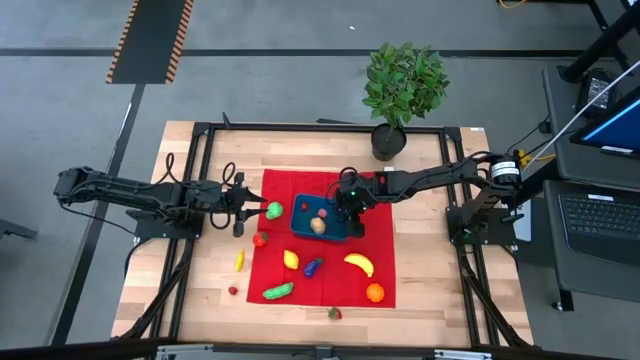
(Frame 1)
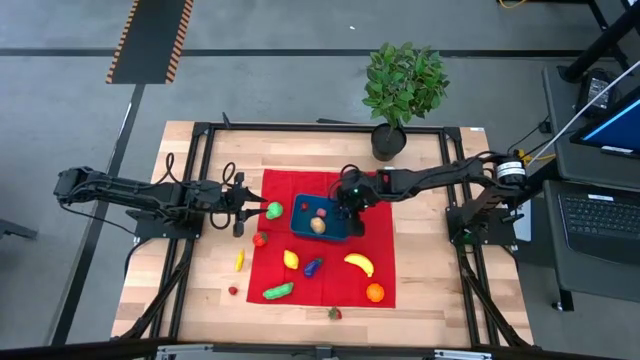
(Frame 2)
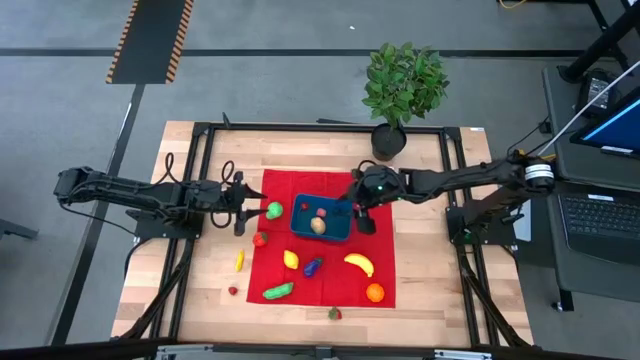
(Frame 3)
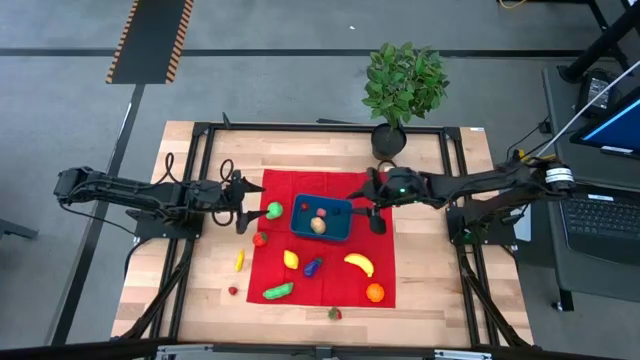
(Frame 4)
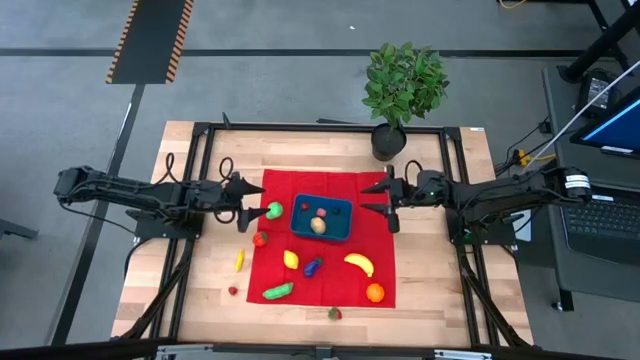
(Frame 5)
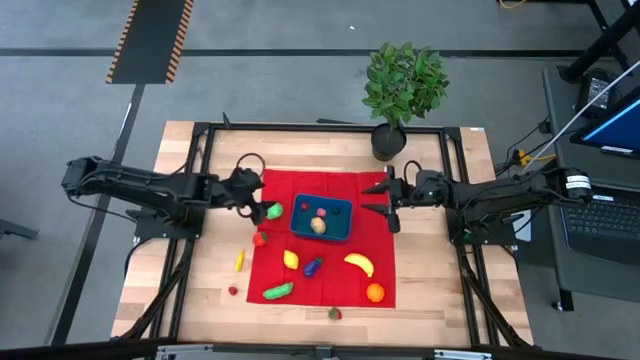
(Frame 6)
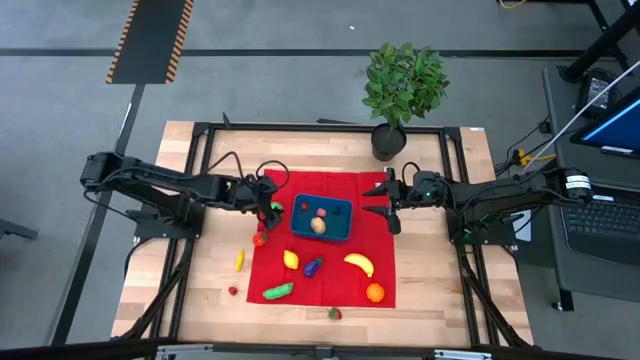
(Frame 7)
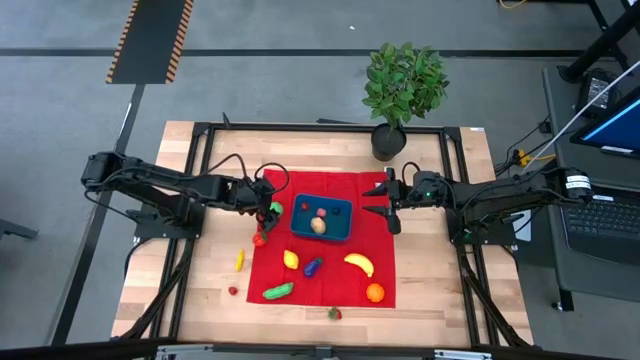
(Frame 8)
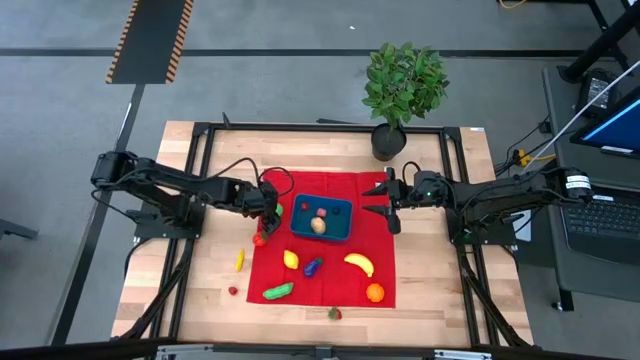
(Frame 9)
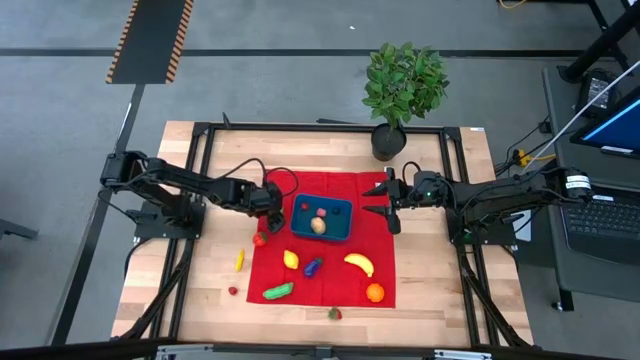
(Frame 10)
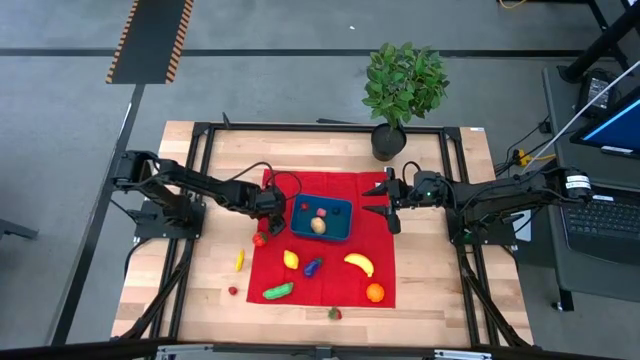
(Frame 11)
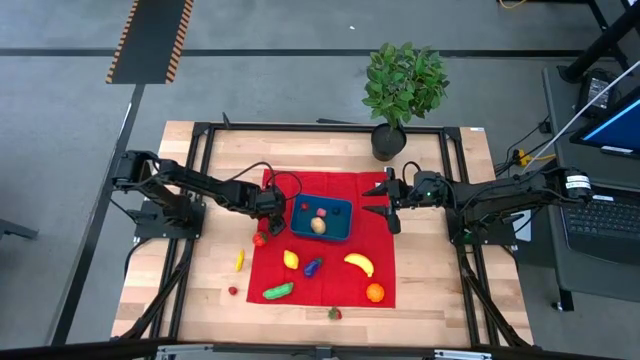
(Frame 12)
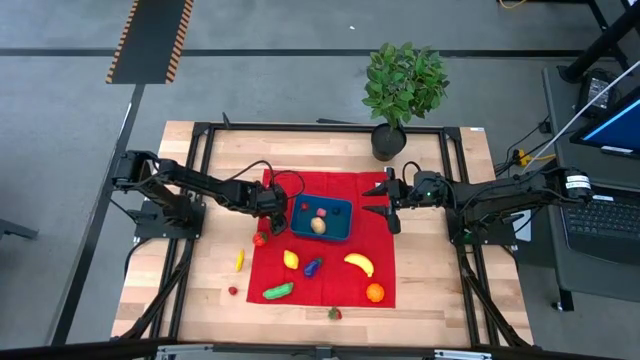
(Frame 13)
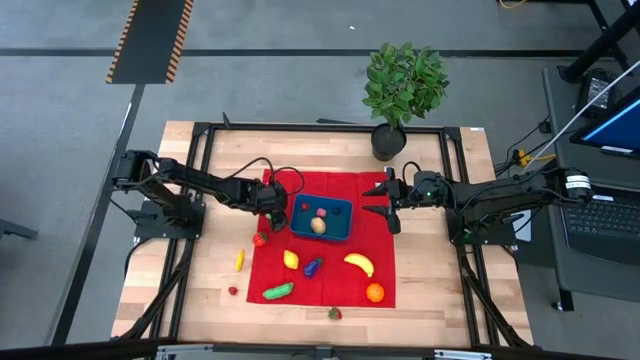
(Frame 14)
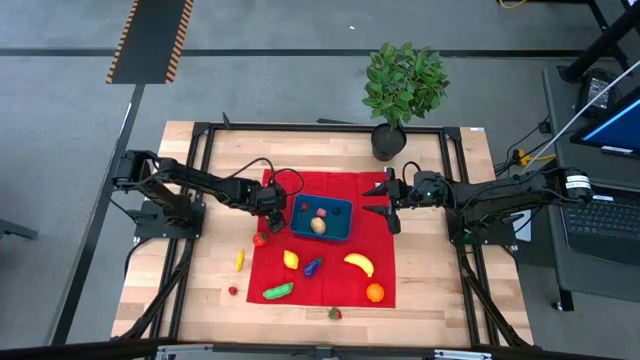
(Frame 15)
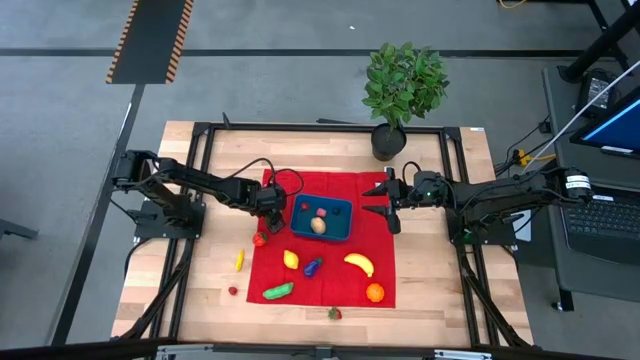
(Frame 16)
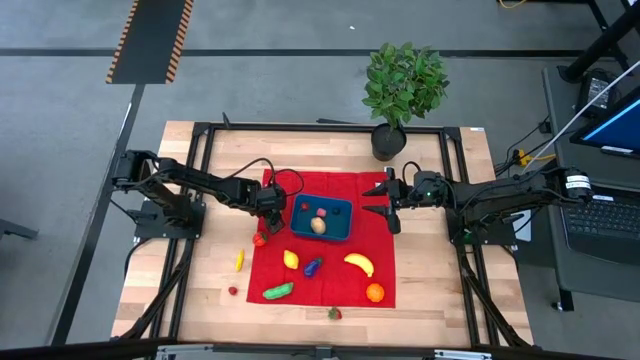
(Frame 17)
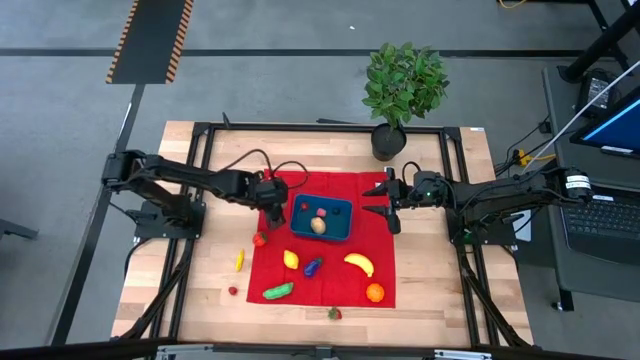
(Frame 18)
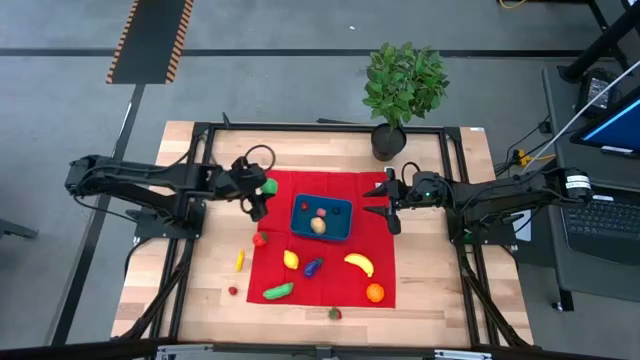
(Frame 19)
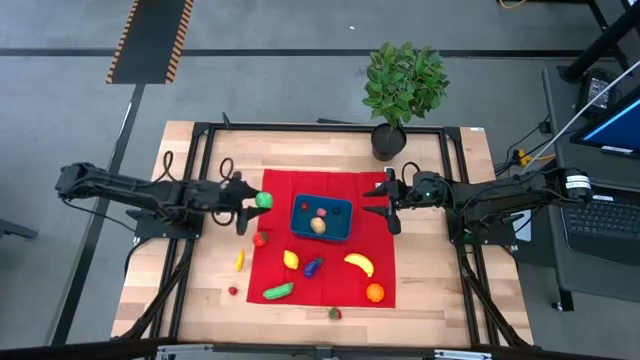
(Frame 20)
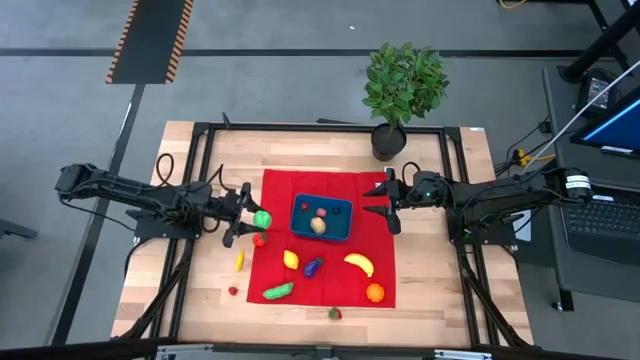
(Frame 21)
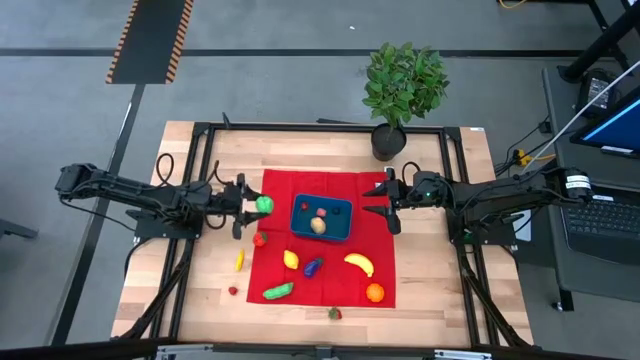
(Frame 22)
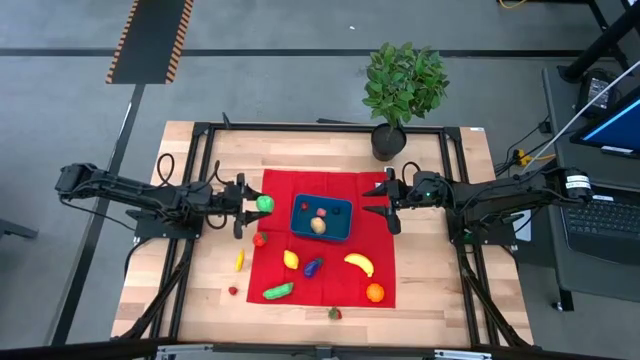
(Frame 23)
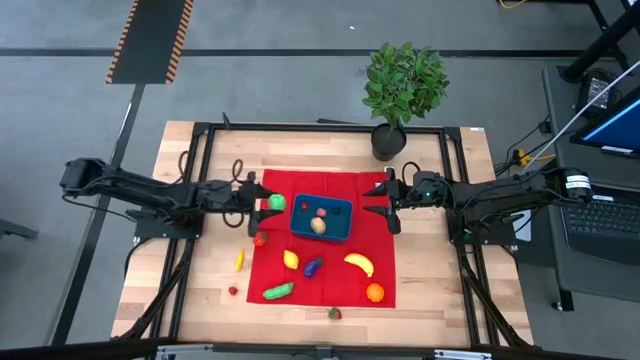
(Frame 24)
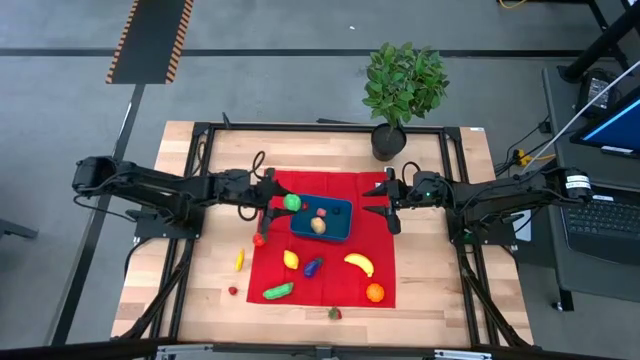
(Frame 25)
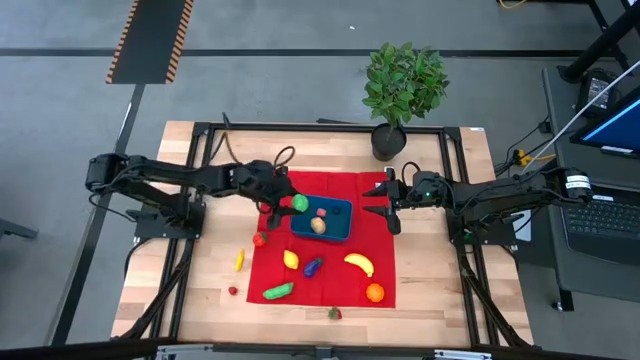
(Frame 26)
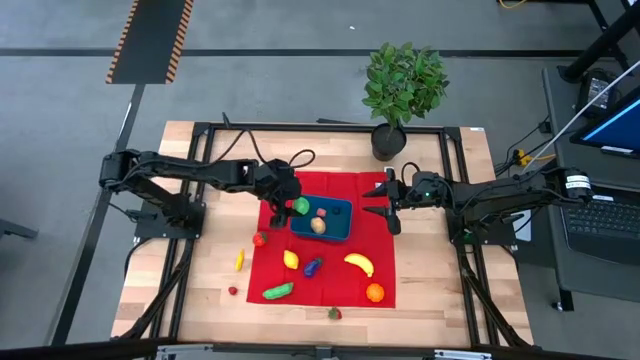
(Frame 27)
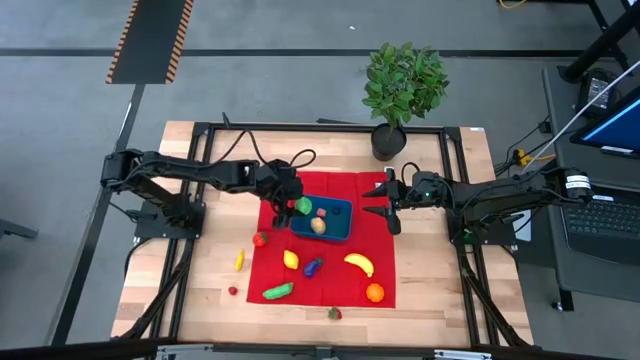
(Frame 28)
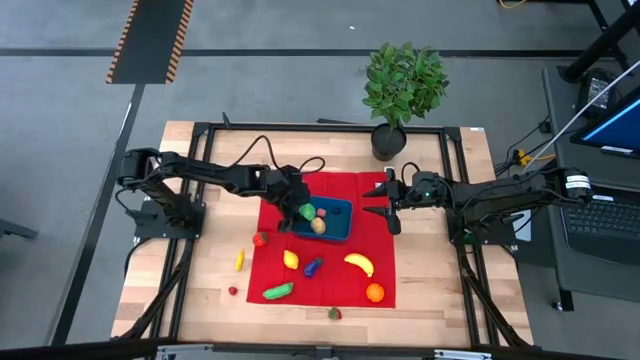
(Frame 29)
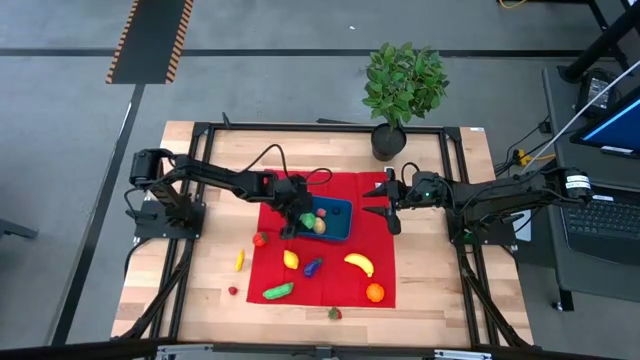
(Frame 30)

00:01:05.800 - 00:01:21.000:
Task: Pick and placing Produce into tupperware
Put the green pear into the blue bin

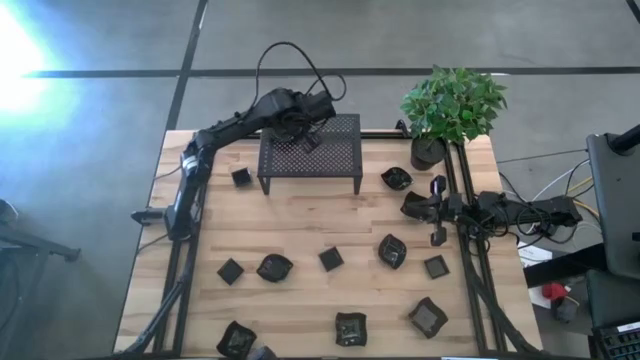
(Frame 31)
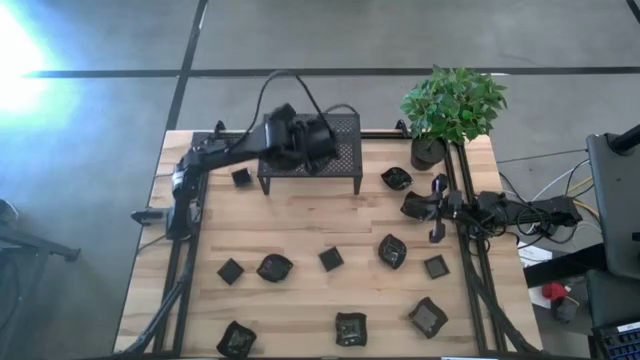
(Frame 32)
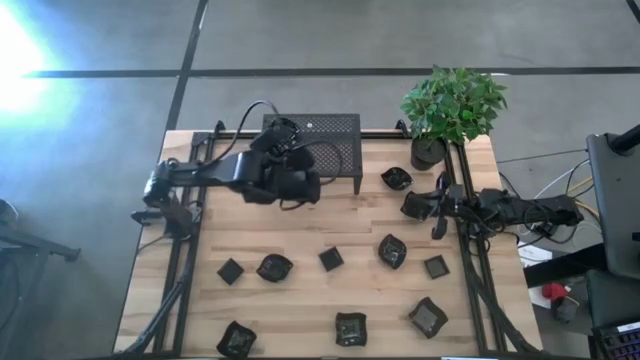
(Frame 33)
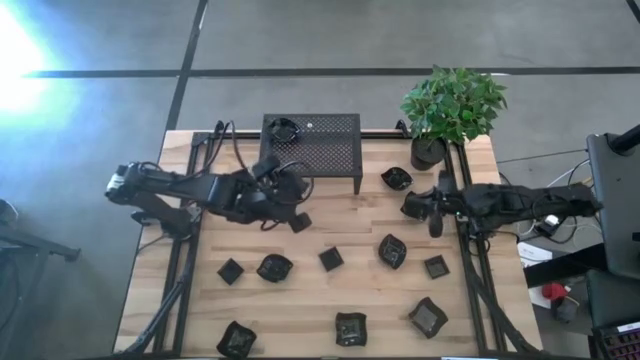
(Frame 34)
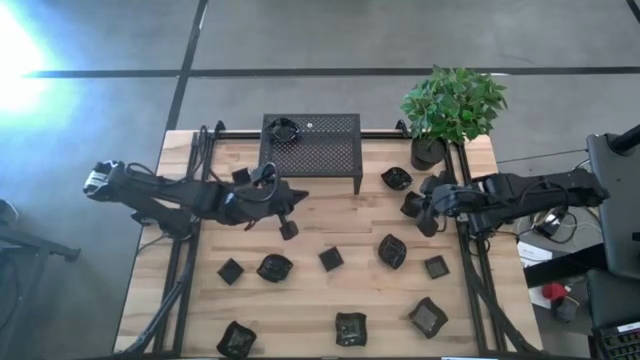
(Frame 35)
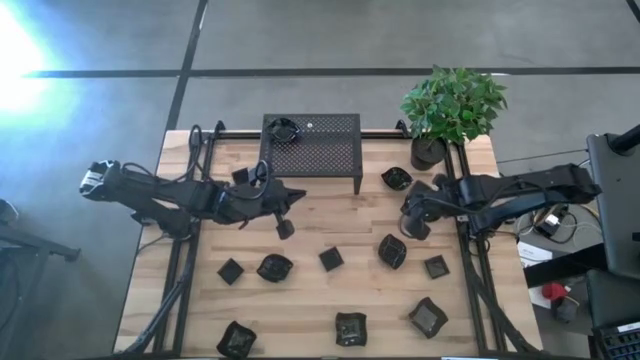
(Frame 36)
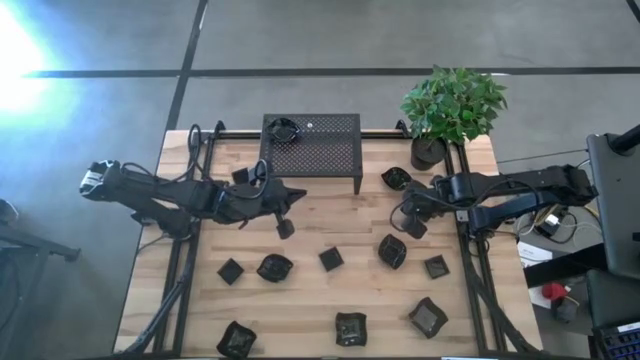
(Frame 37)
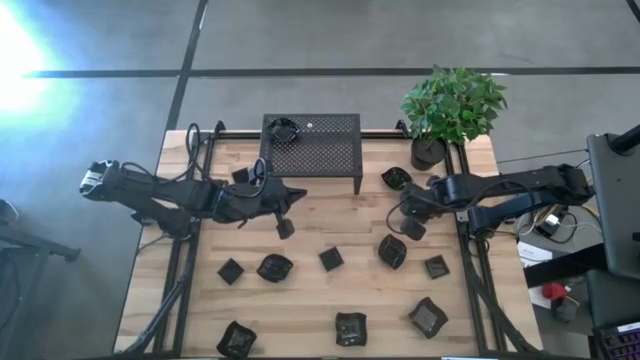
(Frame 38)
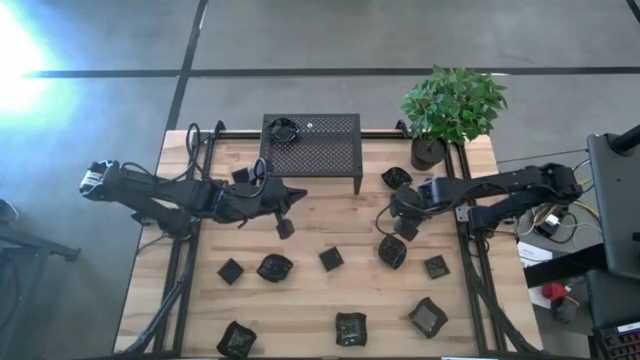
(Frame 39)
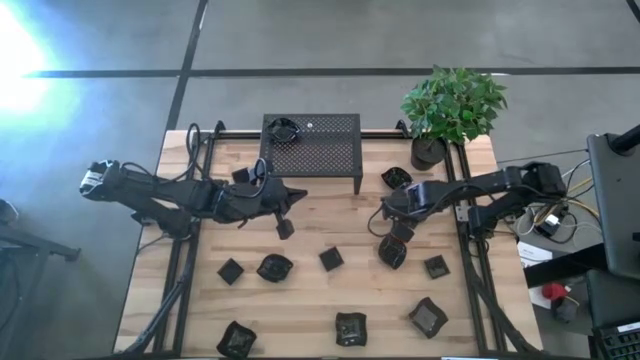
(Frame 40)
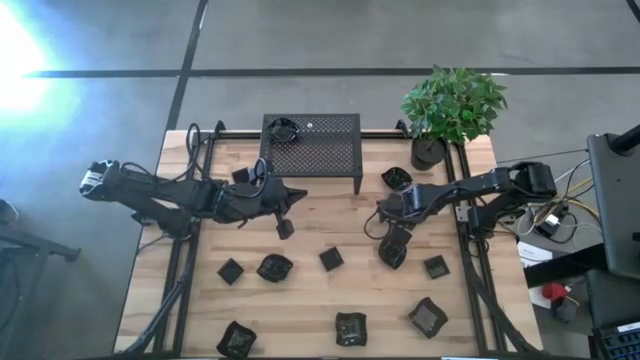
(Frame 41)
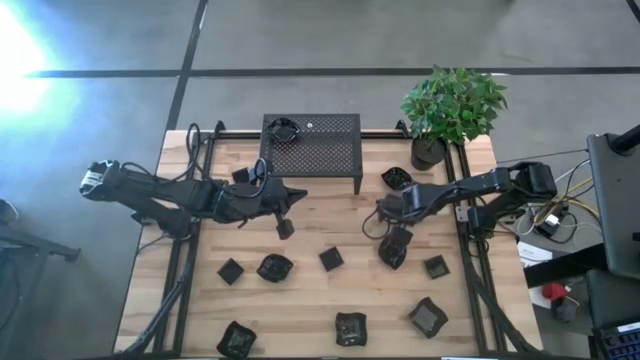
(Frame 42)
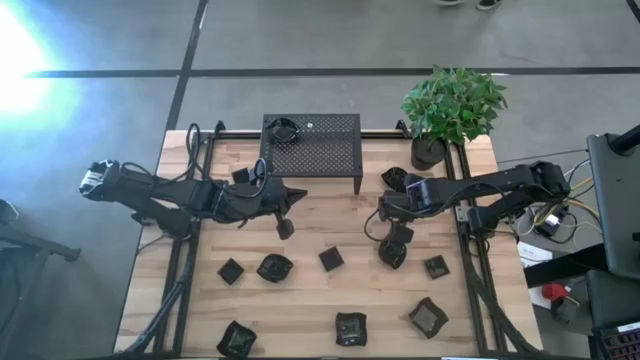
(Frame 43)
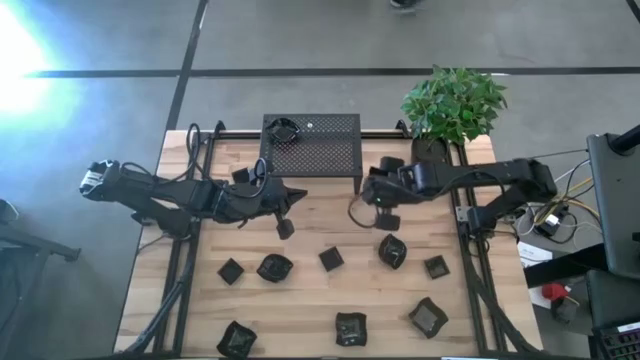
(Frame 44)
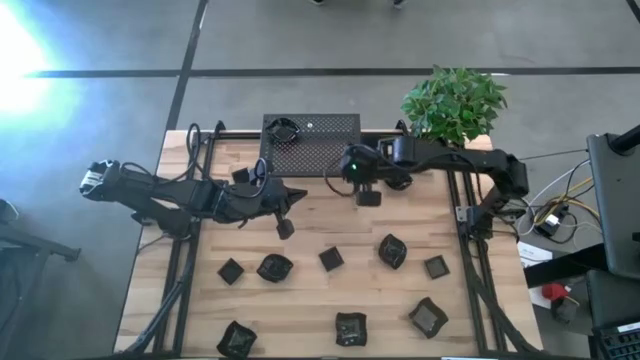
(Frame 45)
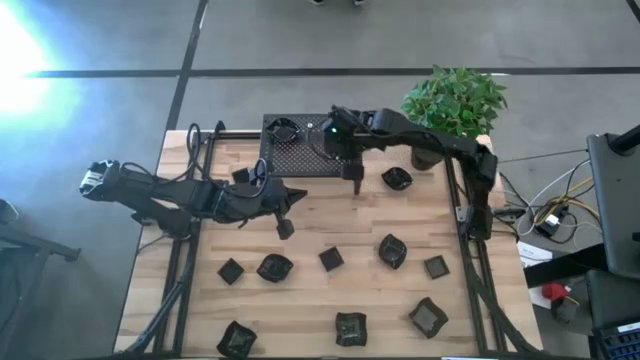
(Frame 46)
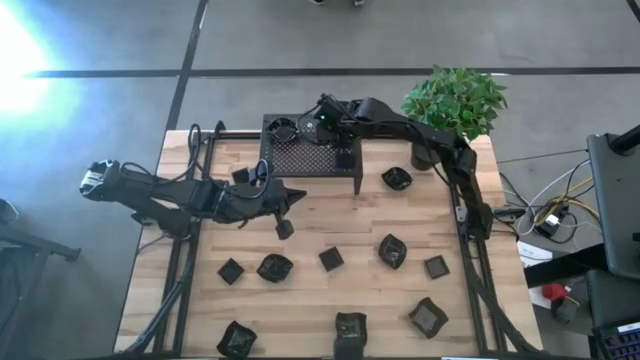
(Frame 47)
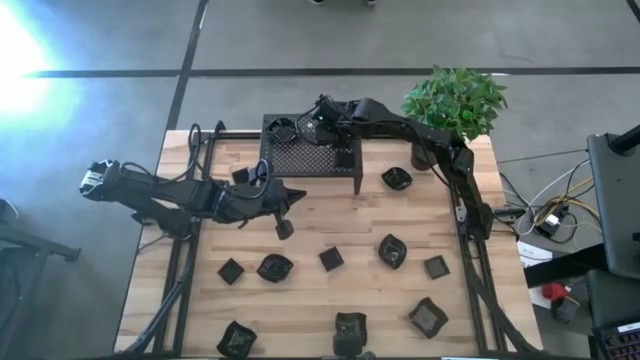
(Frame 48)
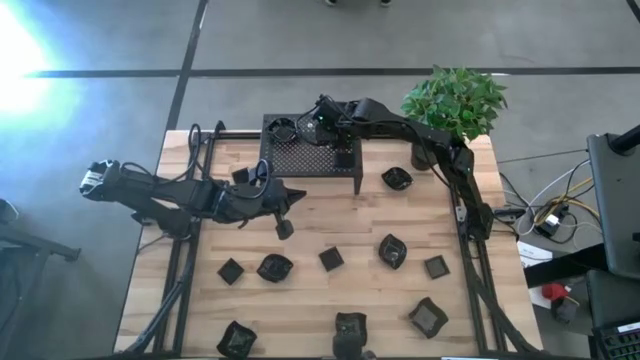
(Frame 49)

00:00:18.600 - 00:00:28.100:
Task: Pick & Place Mini shaped plates
Put the distorted square plate on the shelf
